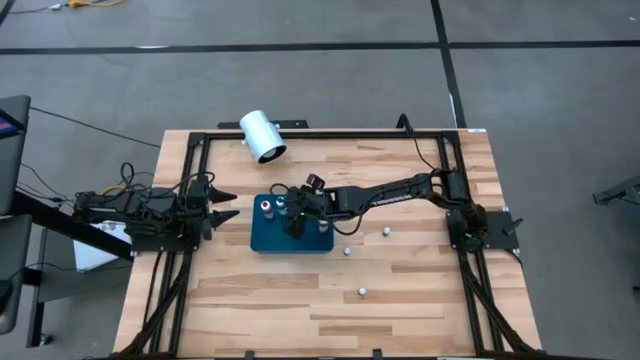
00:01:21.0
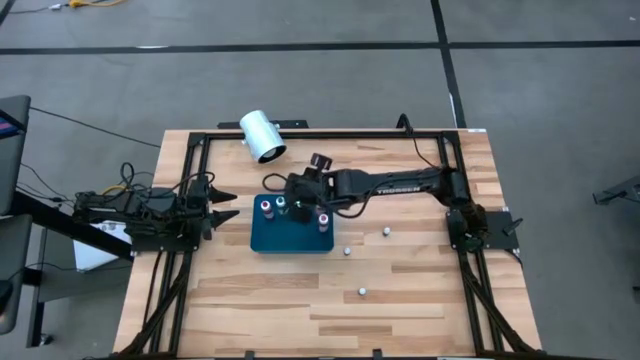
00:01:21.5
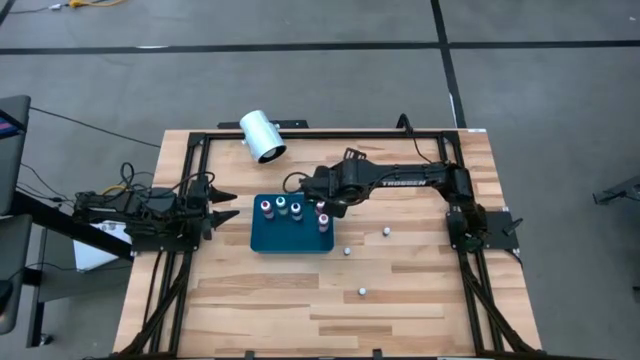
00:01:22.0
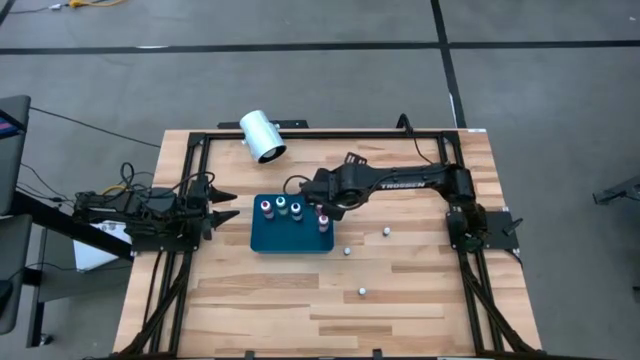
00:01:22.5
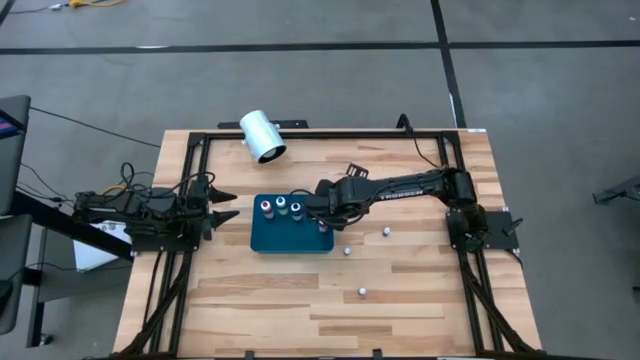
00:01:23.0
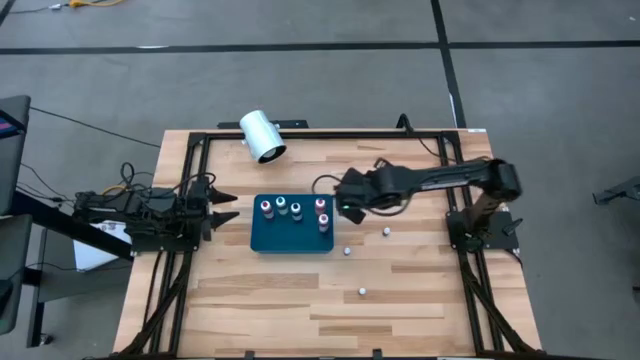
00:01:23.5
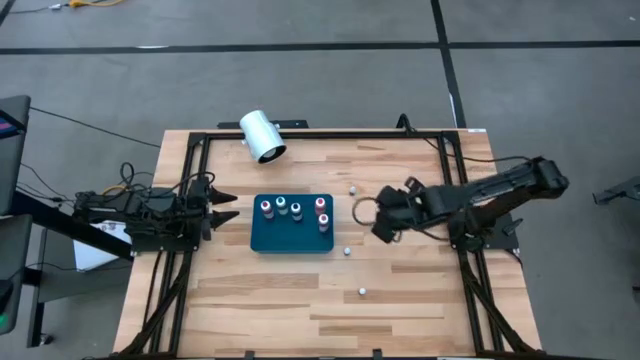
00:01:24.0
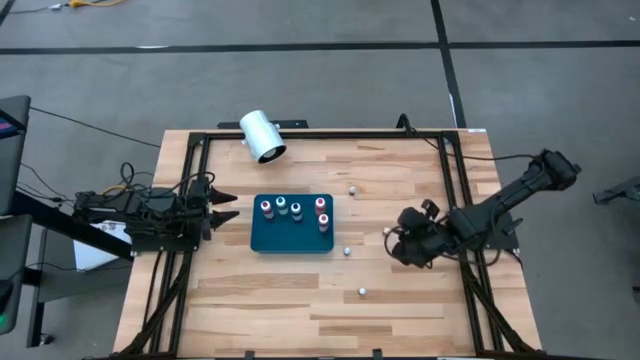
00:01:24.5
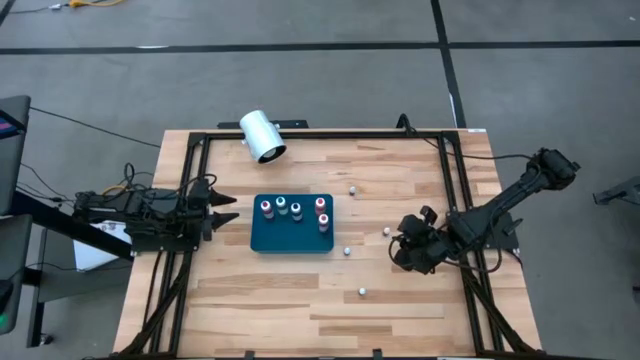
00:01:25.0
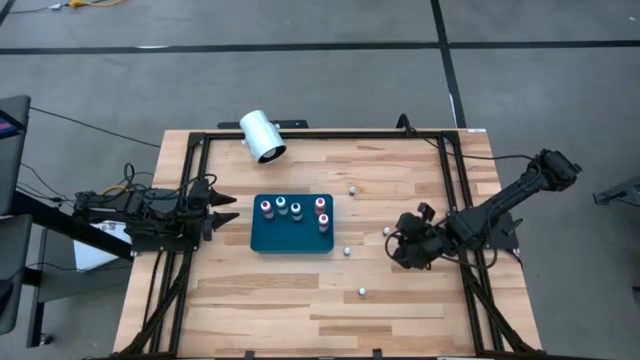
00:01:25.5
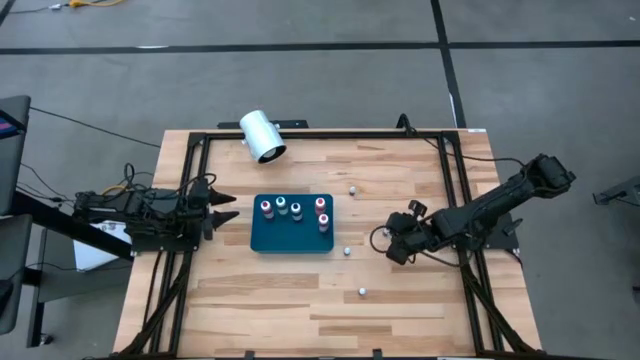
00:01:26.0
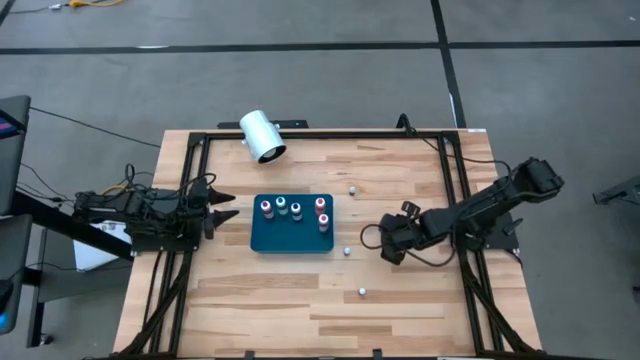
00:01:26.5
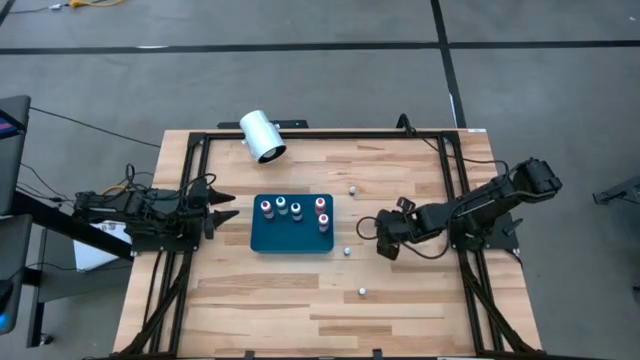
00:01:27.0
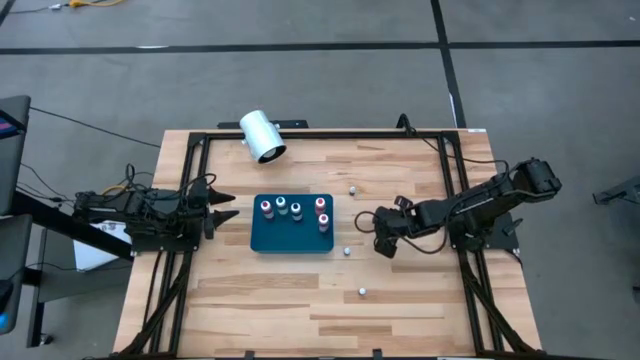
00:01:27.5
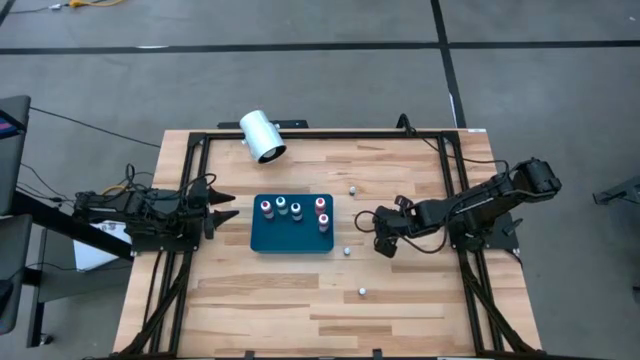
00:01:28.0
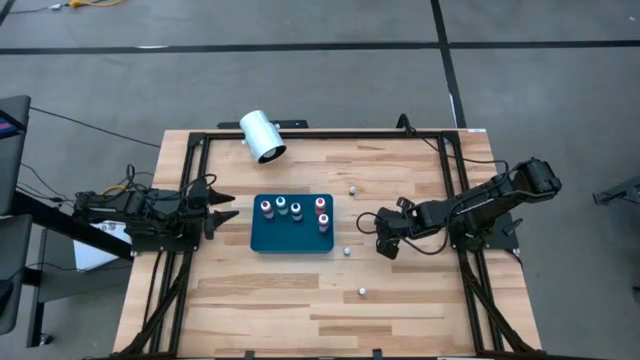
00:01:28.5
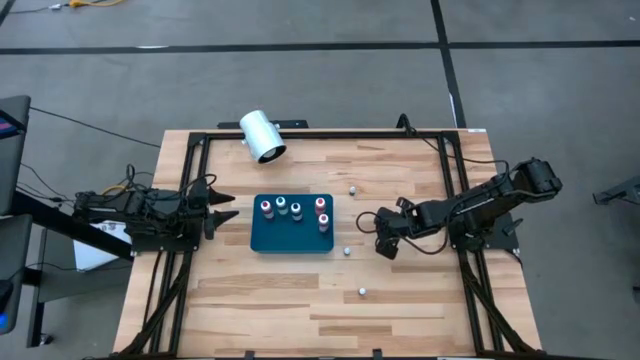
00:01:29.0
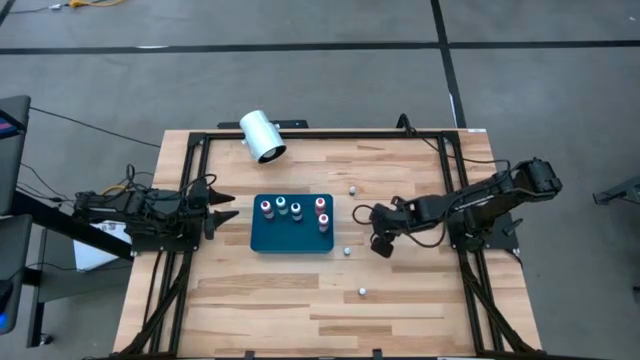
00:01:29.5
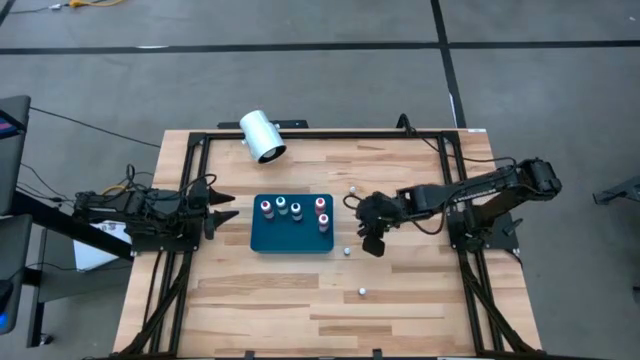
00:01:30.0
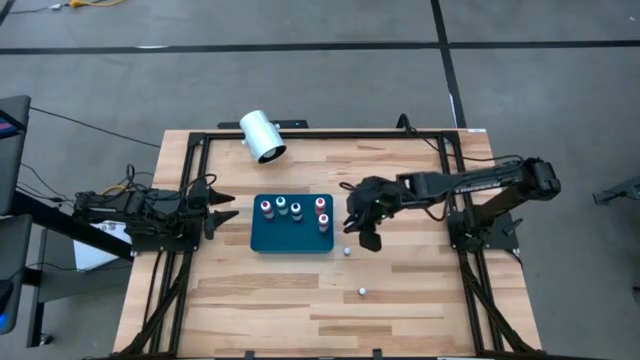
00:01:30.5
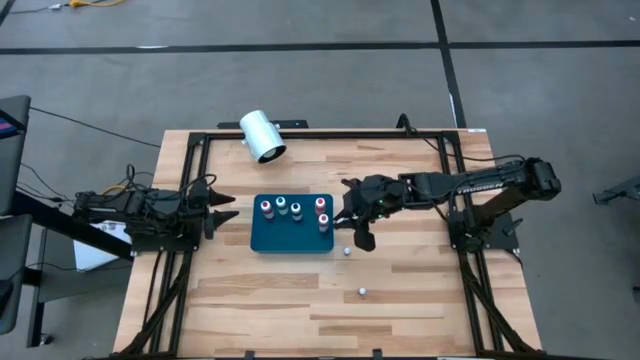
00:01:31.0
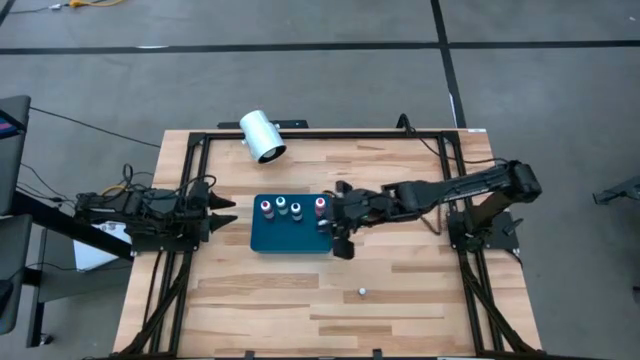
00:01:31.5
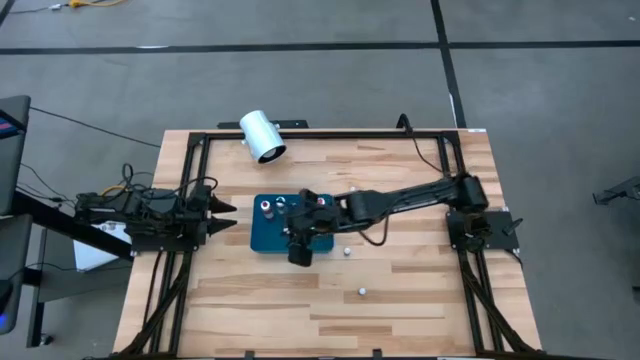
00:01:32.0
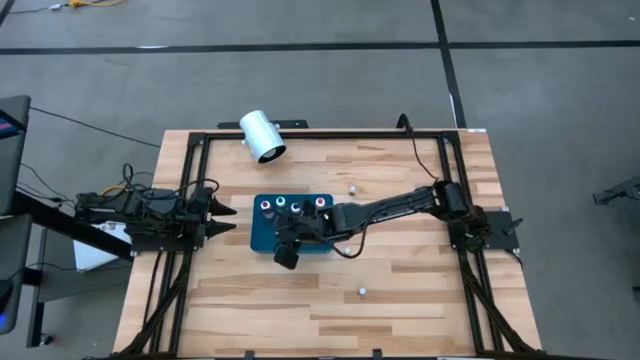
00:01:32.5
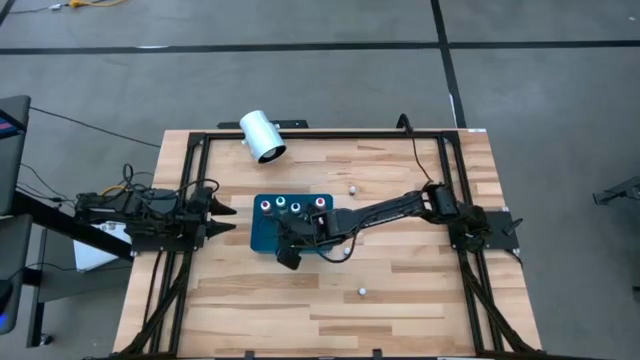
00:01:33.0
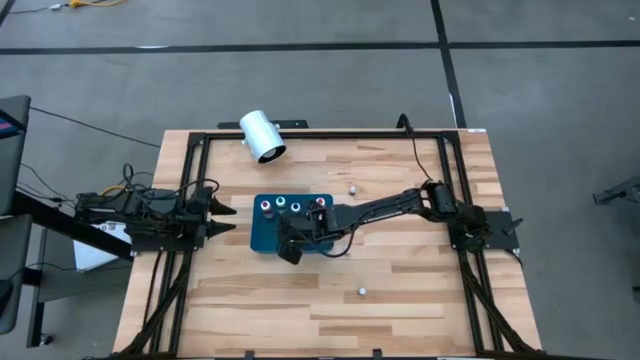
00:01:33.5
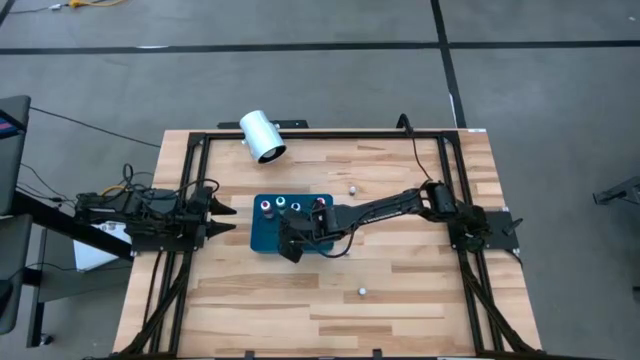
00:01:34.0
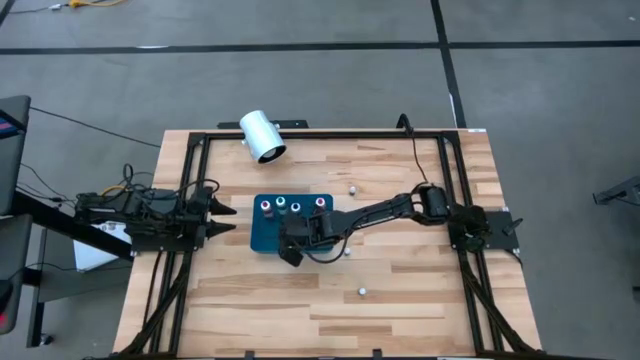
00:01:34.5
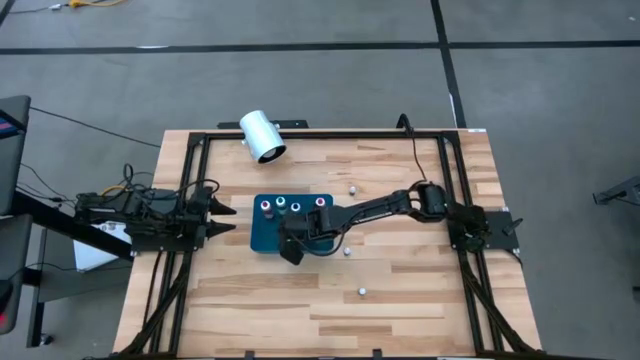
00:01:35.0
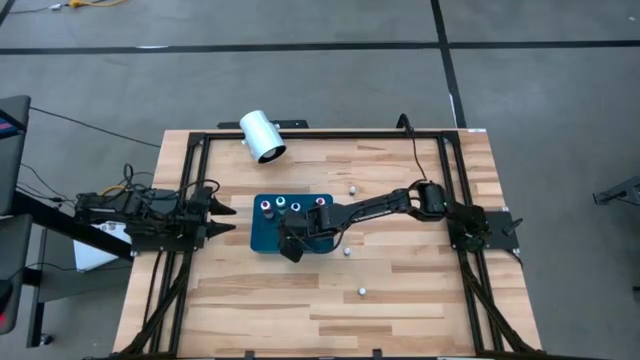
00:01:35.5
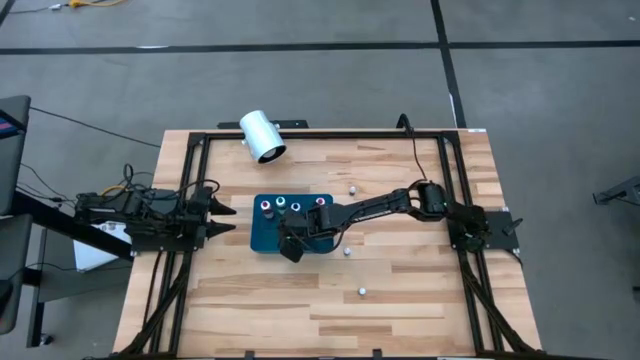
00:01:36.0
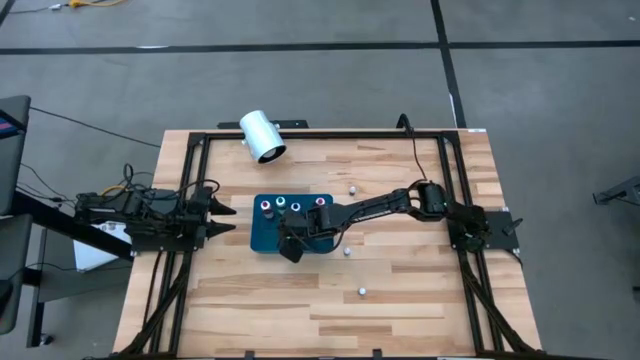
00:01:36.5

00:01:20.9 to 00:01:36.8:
Task: Pick & Place food coloring
Put the small green food coloring bottle into the bin

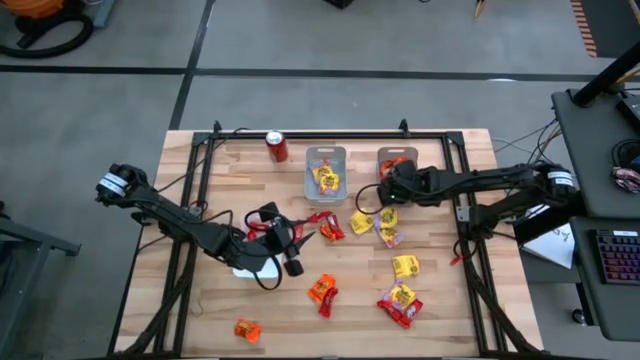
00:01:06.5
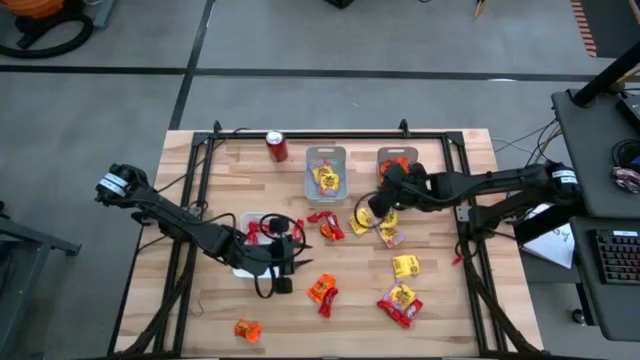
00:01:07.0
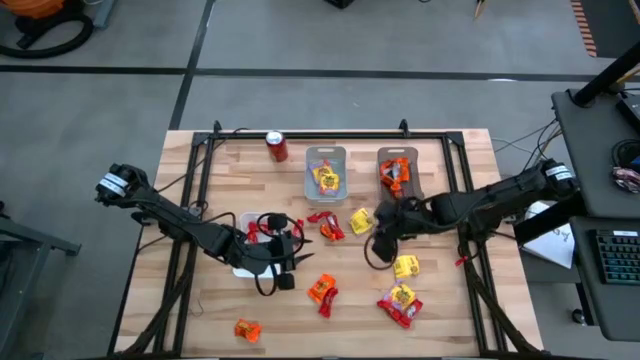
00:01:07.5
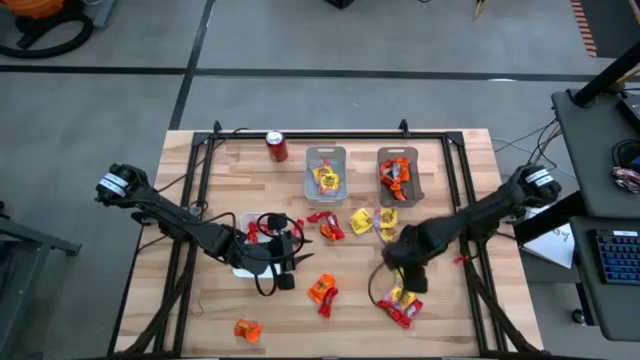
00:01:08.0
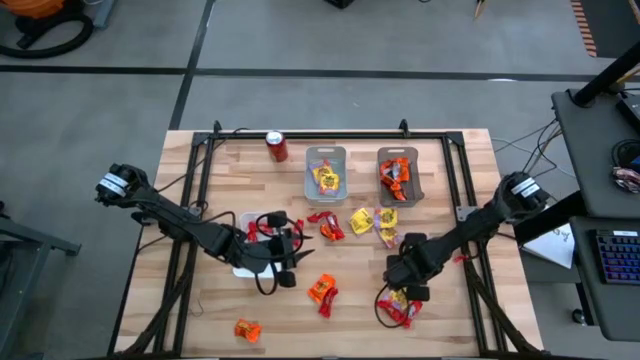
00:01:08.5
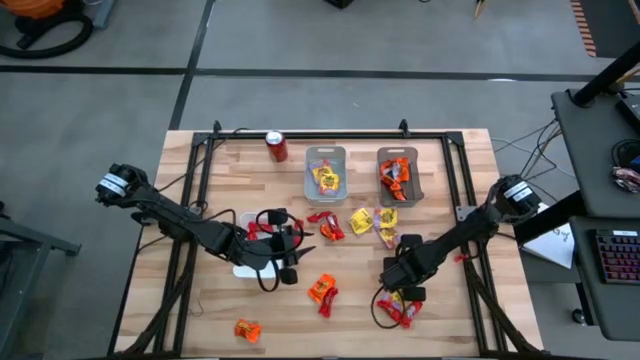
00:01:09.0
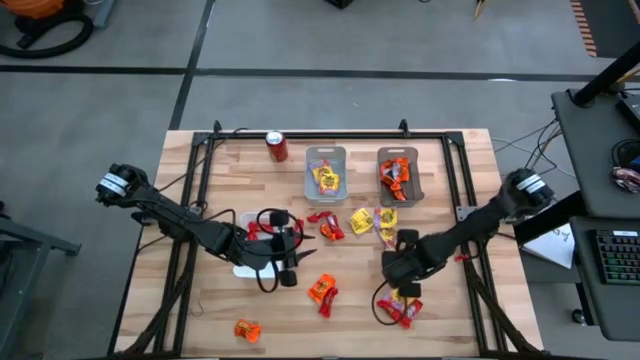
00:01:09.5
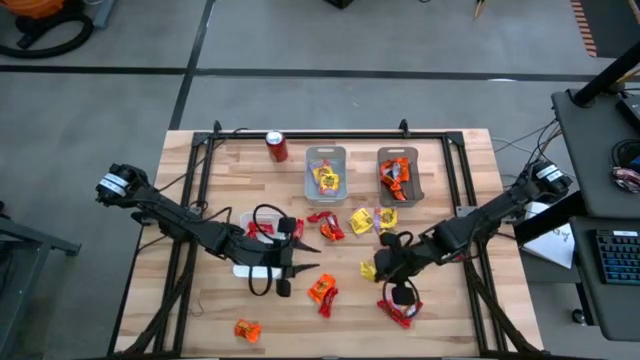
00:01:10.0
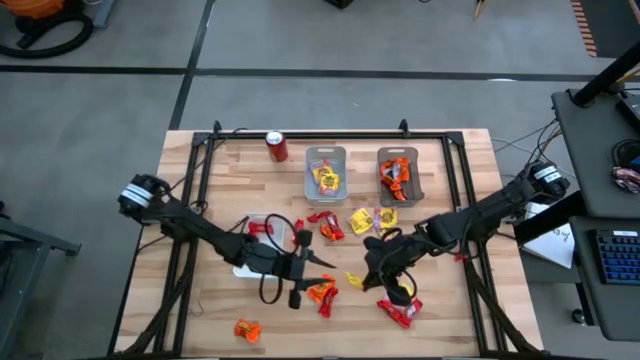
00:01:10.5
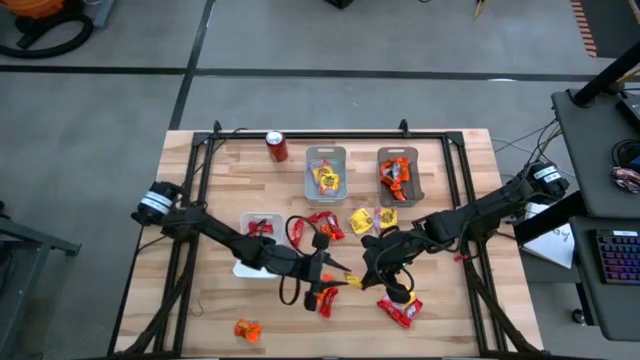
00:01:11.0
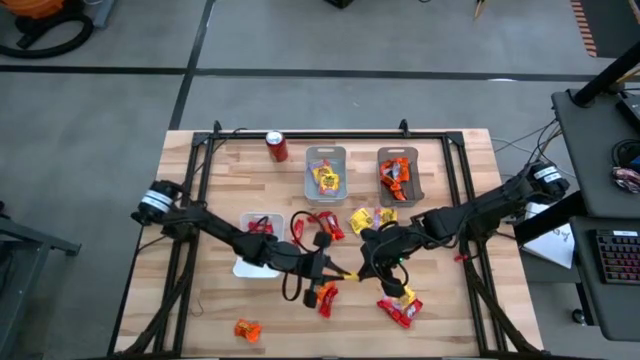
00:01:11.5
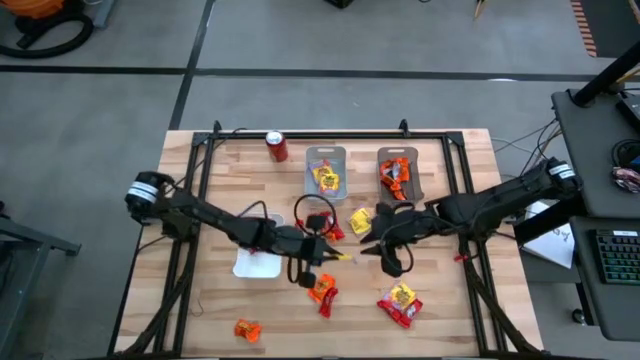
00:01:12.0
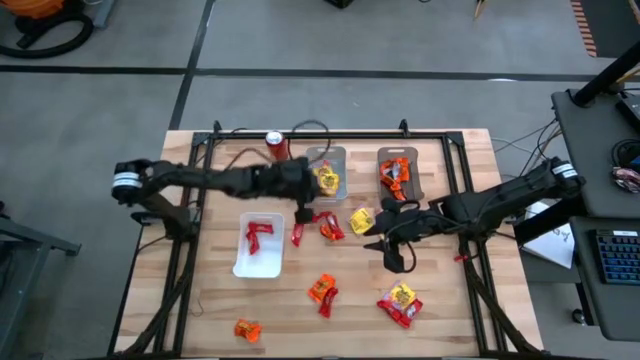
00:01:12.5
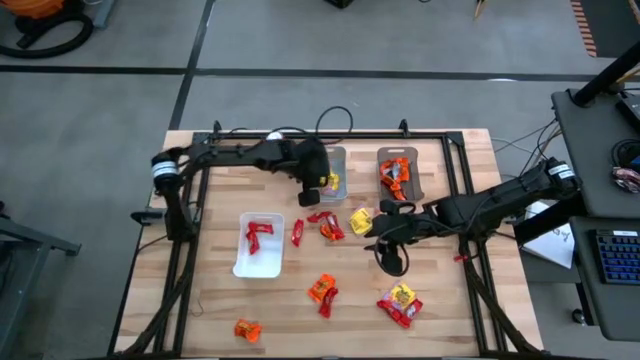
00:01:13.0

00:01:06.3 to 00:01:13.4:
Task: Sort candy
Put the yellow candy into the gray bin
